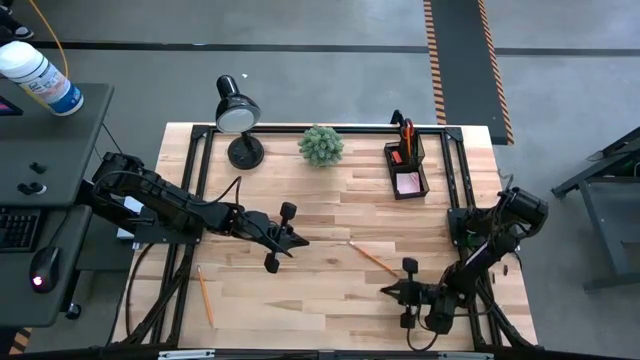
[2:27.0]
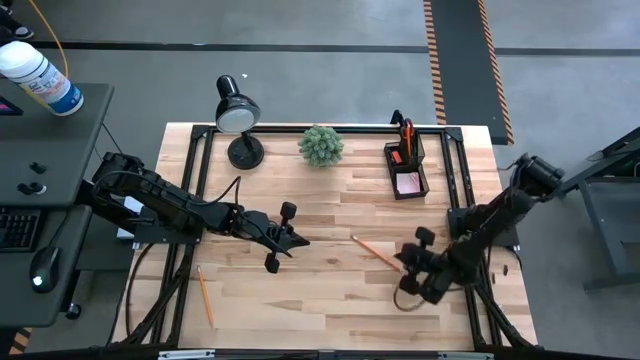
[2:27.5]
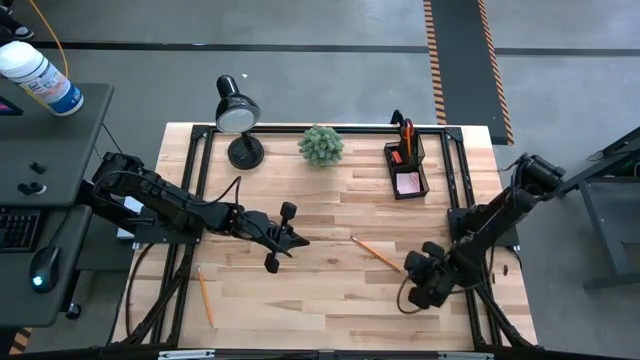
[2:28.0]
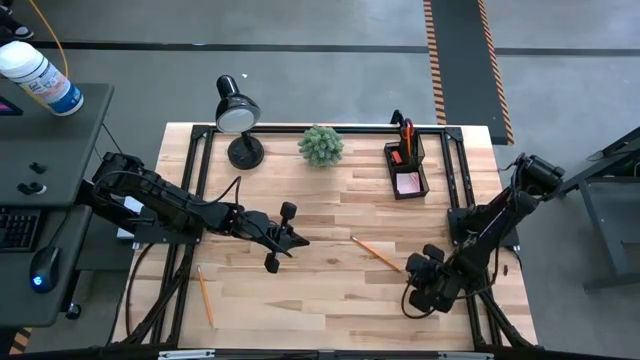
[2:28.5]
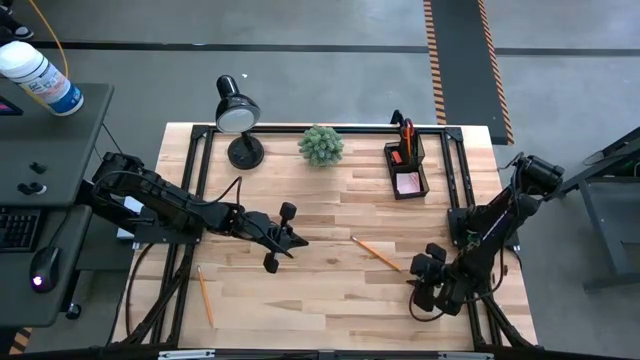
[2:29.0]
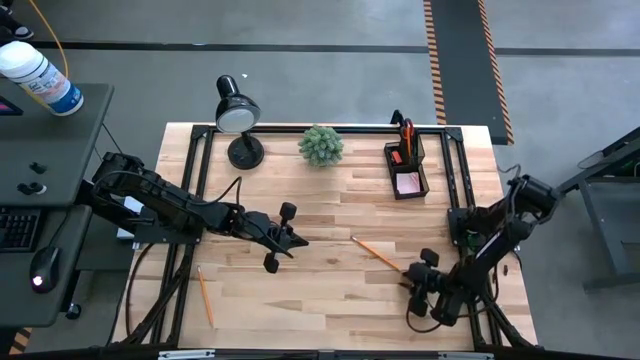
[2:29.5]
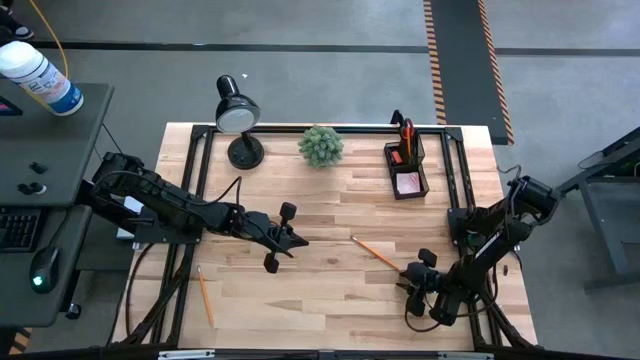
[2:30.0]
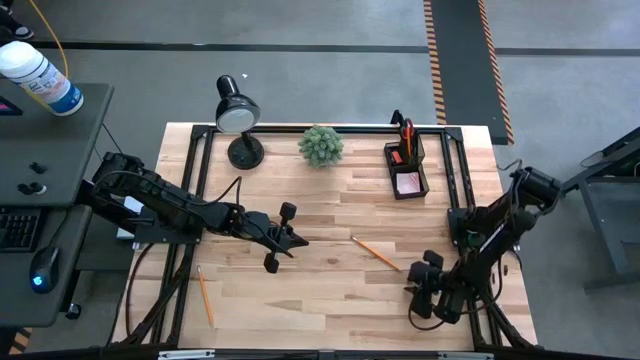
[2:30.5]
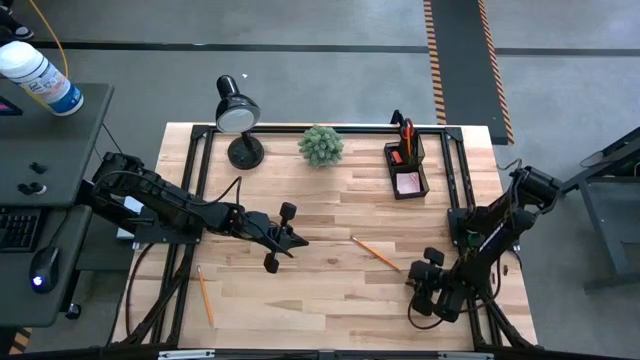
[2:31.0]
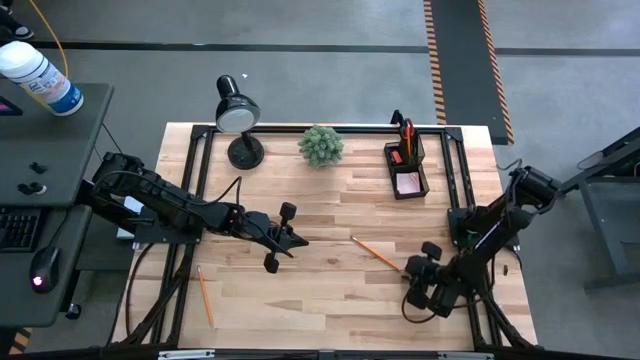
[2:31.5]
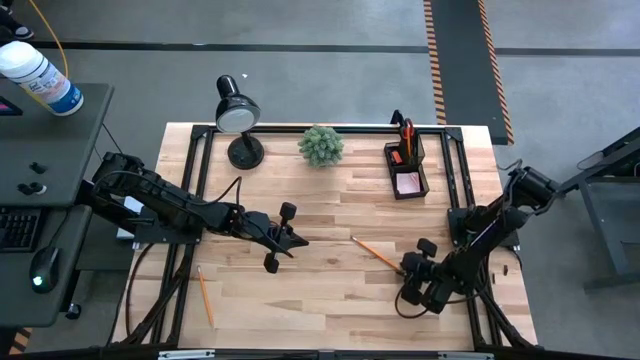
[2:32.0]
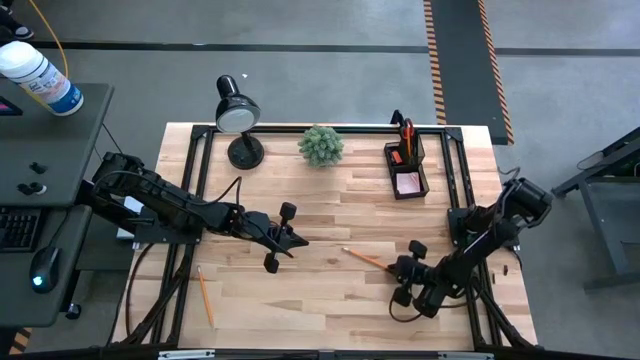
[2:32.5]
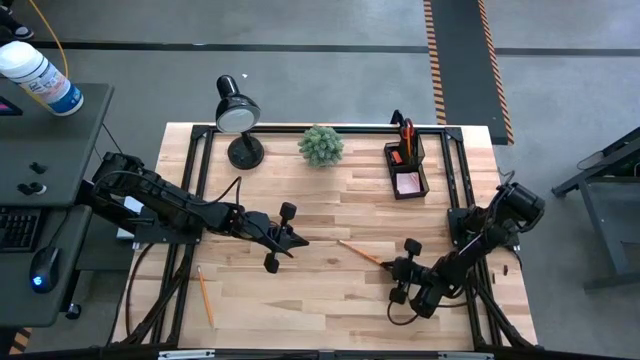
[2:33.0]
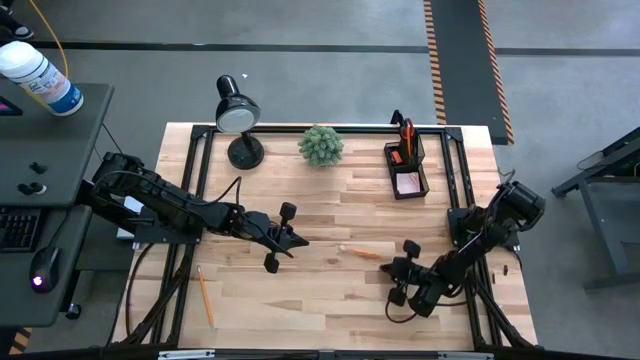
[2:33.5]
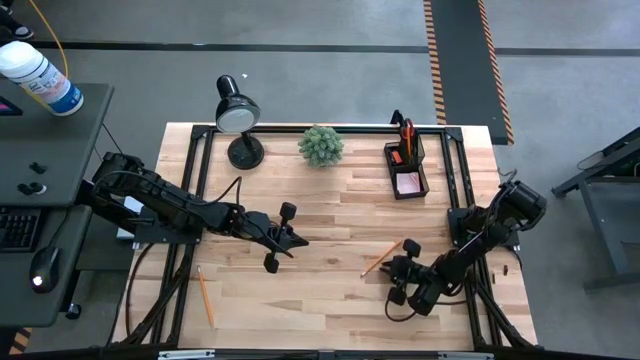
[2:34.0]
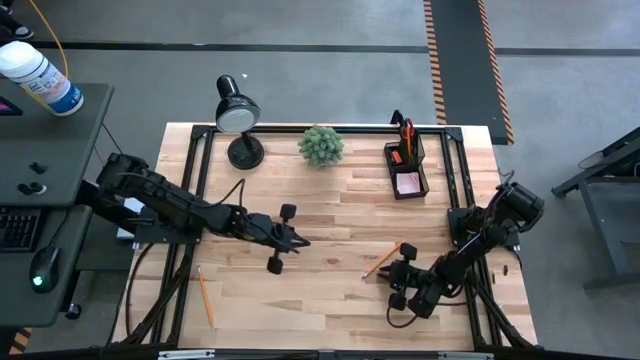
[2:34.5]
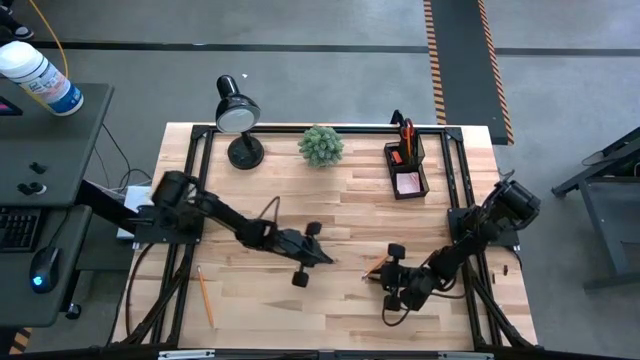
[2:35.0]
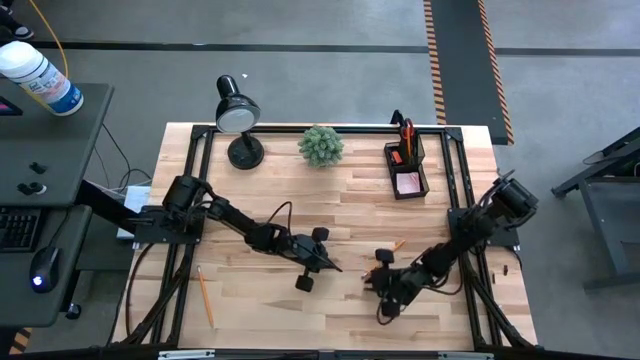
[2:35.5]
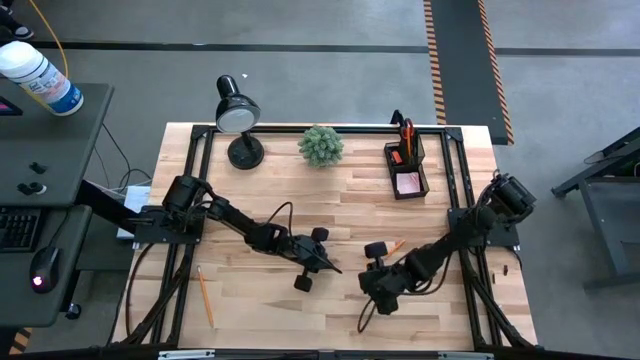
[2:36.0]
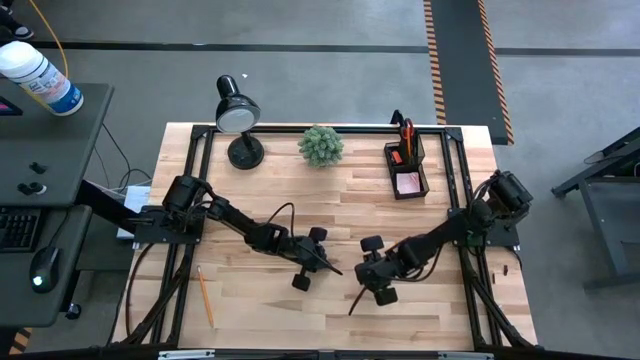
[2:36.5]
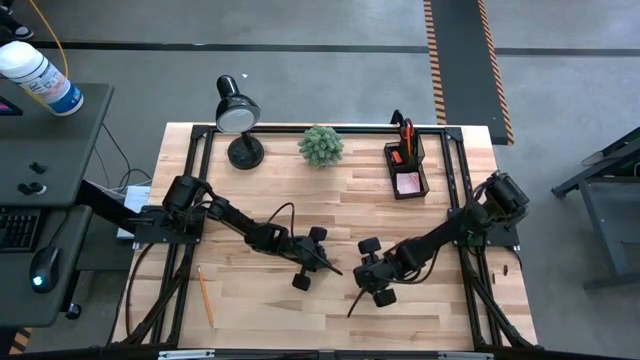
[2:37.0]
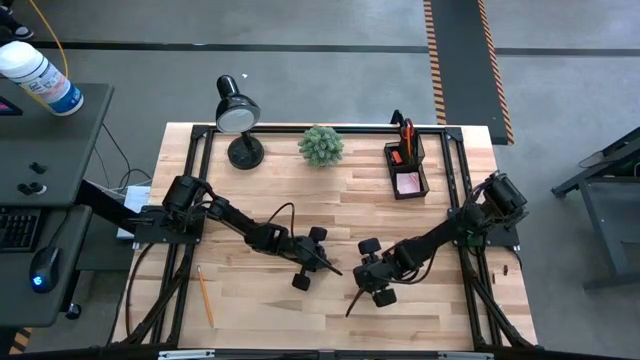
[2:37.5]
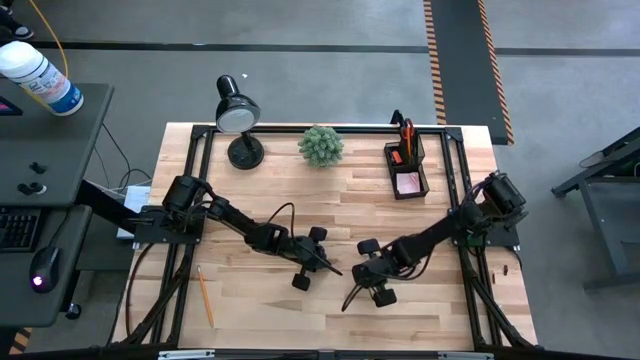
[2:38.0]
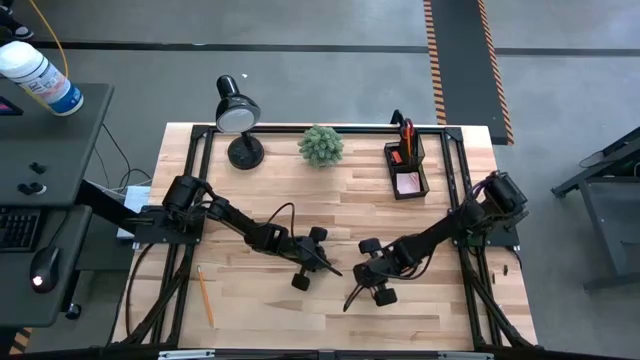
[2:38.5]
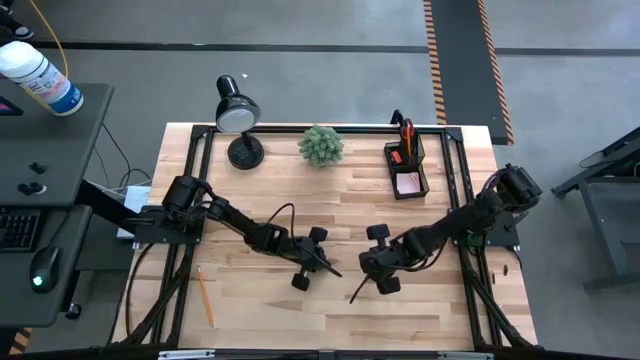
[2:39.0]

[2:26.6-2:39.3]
Task: Pick and place office supplies into organizer
Put the right pencil into the desk organizer

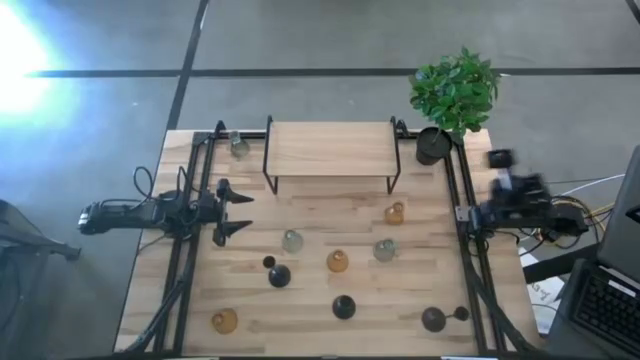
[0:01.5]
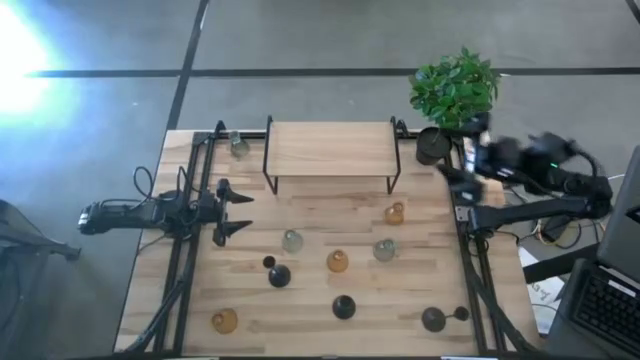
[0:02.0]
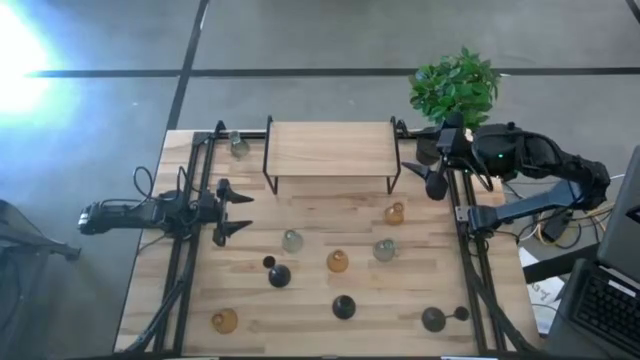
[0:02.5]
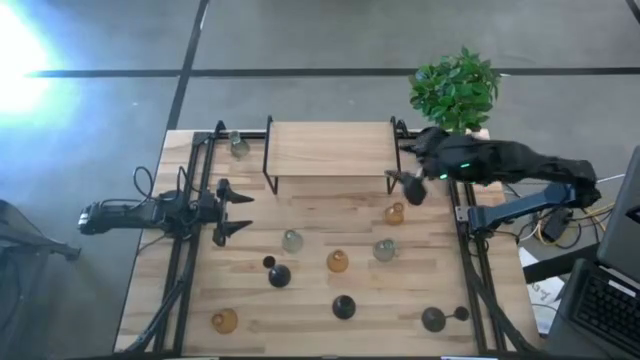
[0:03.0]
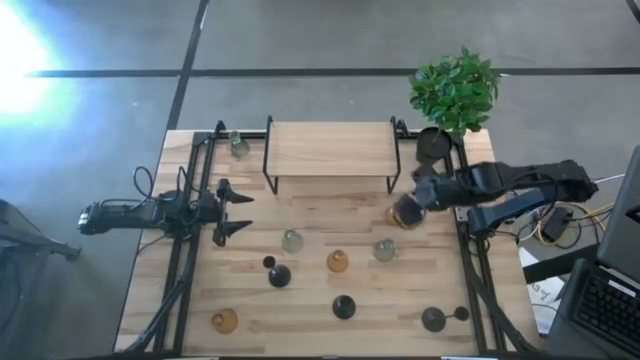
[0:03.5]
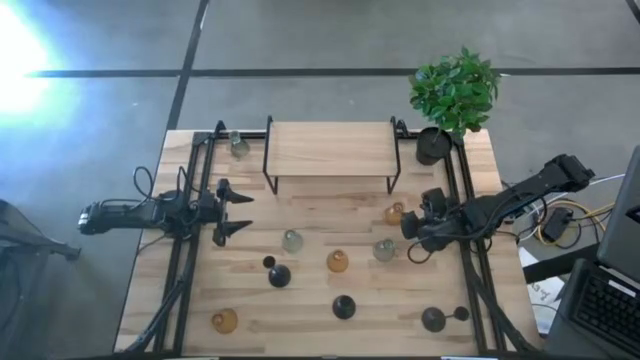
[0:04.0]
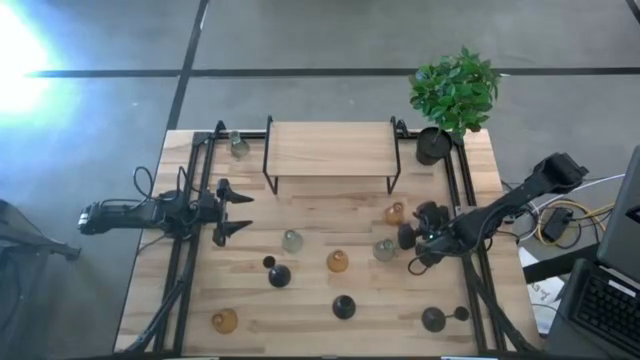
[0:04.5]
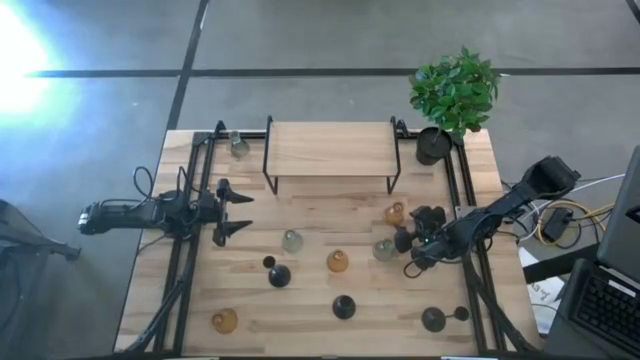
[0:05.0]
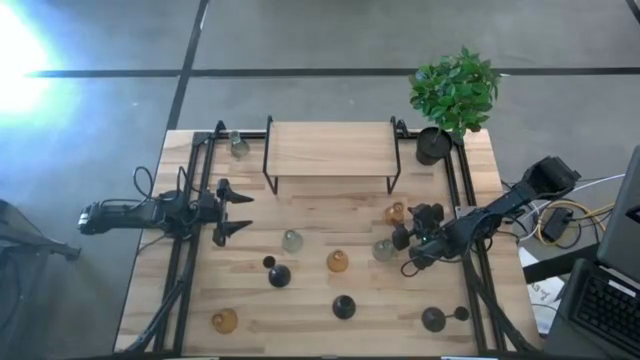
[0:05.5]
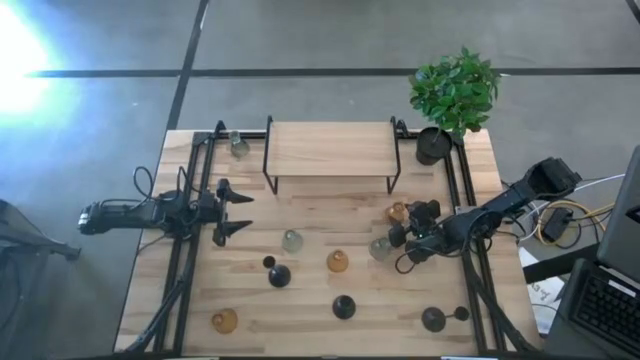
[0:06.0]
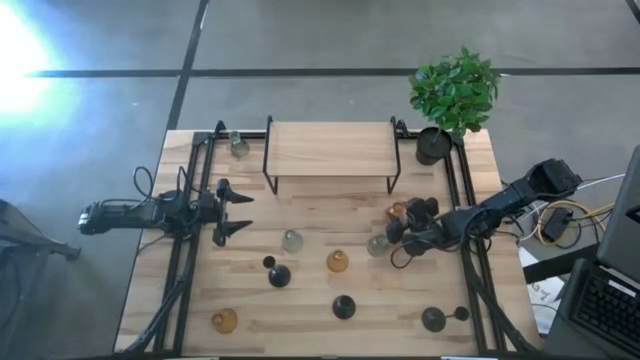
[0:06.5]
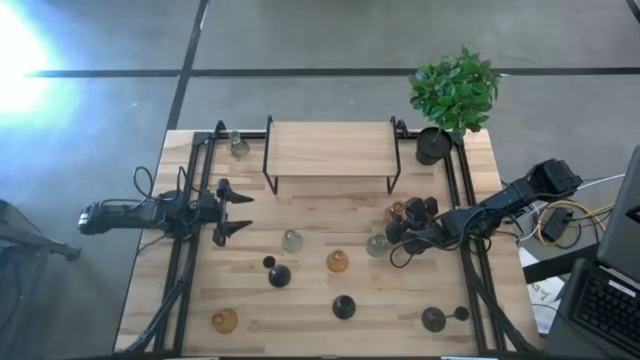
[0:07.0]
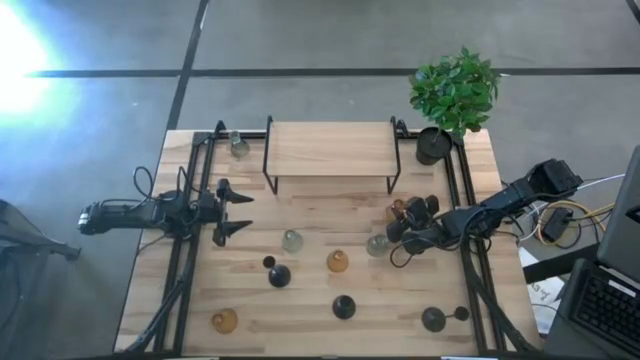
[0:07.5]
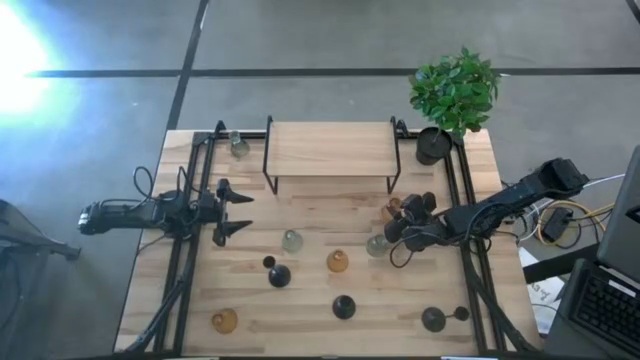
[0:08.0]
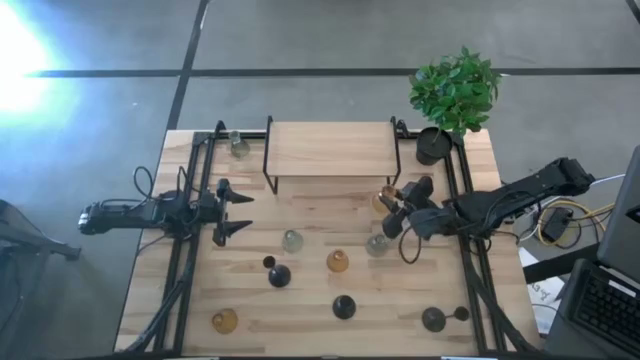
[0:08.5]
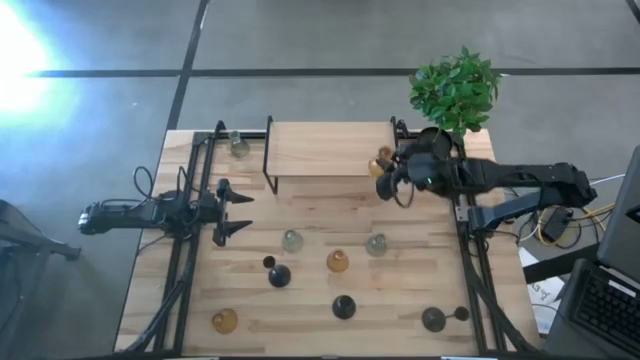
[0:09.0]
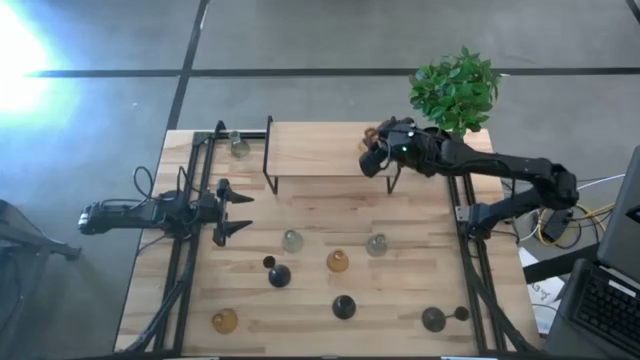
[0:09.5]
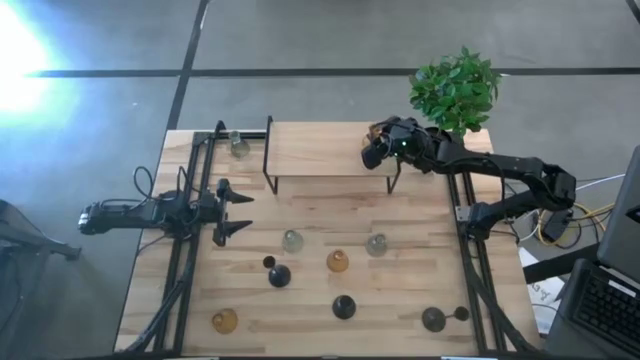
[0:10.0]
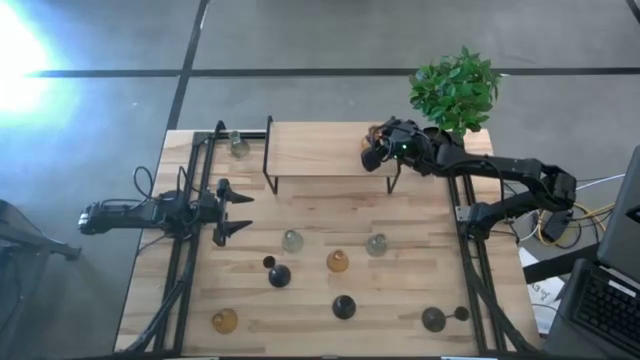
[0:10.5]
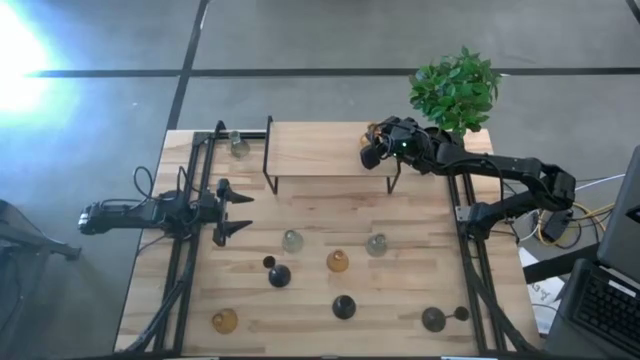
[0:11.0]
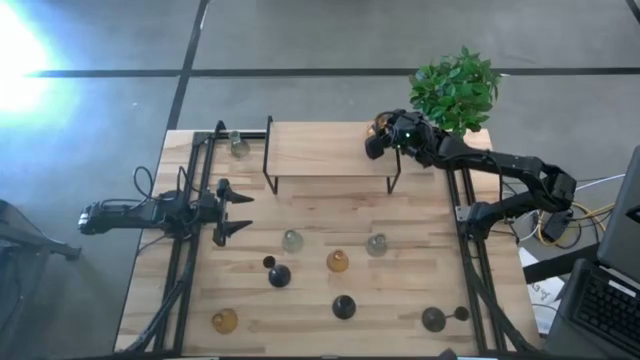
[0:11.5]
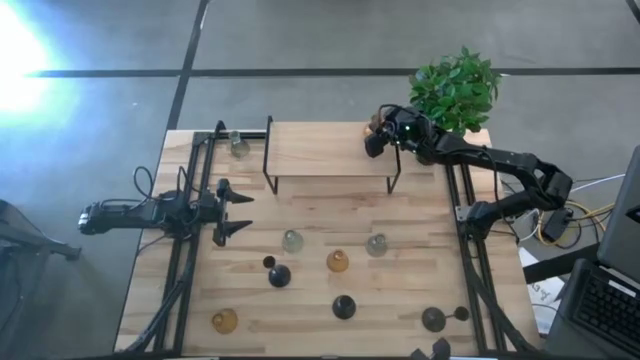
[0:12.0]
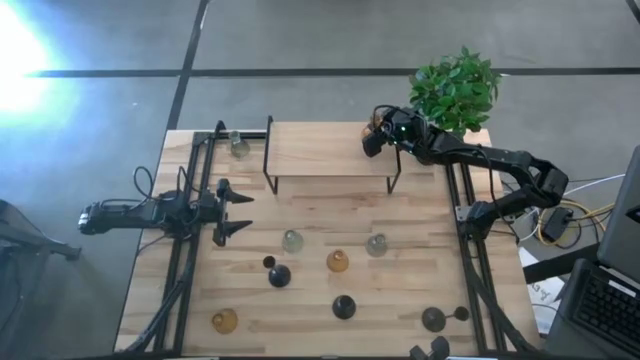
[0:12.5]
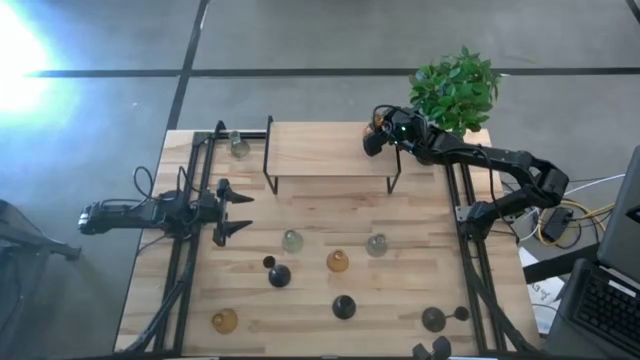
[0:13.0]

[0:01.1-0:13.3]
Task: Pick & Place candle stick holders
Put the top right orange candle holder on the shelf
